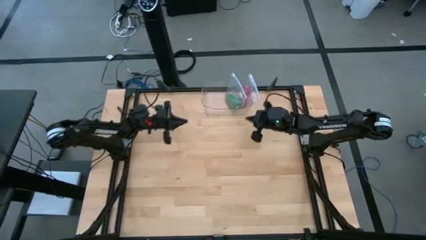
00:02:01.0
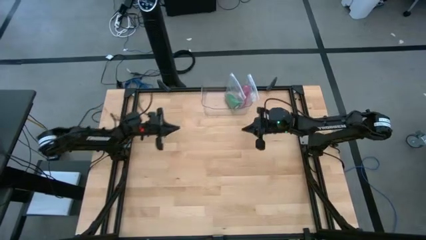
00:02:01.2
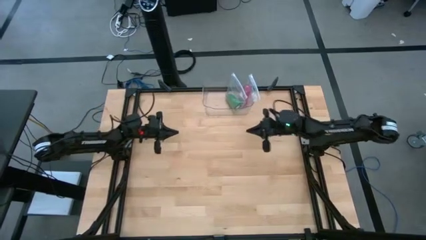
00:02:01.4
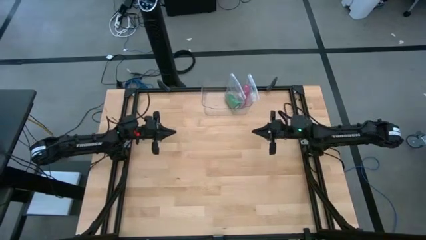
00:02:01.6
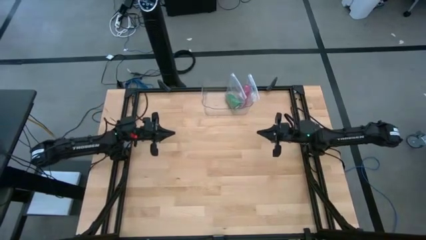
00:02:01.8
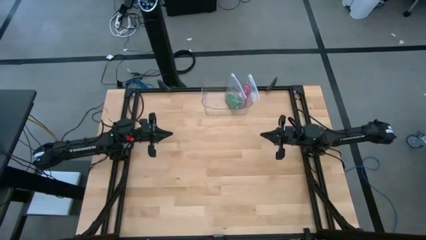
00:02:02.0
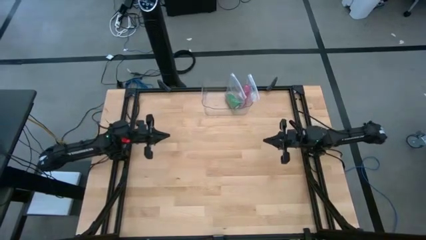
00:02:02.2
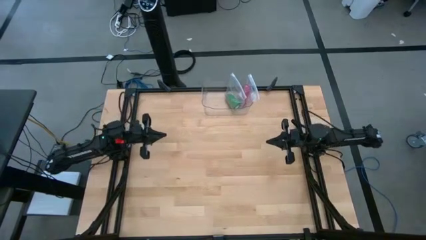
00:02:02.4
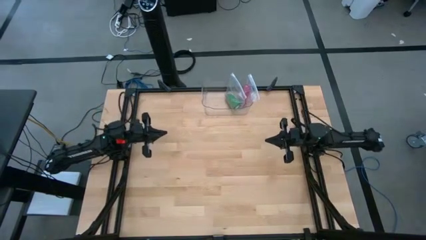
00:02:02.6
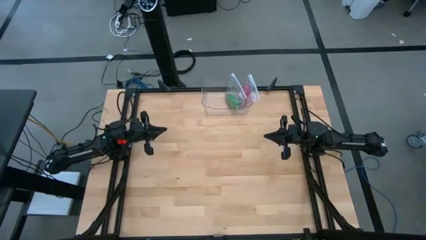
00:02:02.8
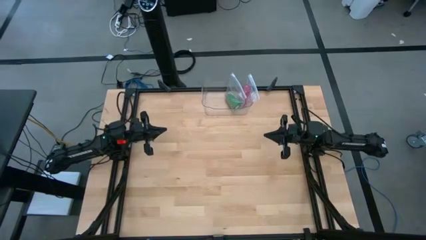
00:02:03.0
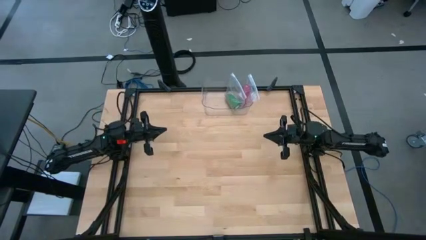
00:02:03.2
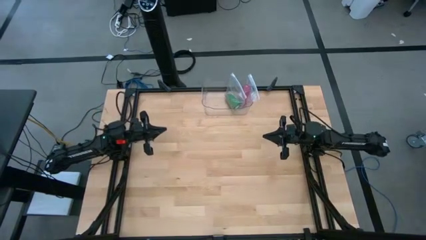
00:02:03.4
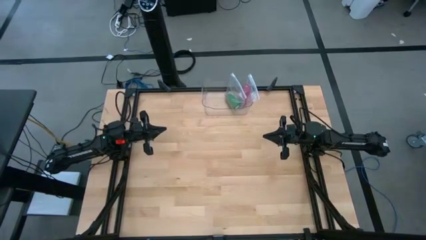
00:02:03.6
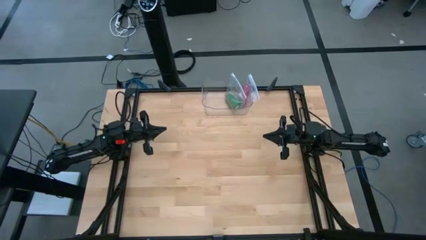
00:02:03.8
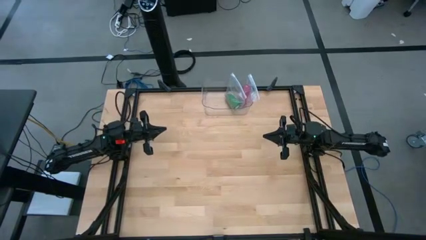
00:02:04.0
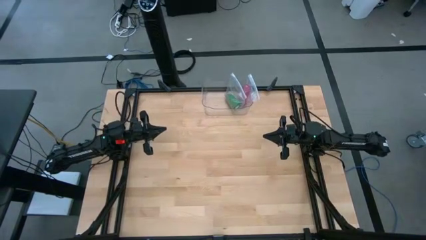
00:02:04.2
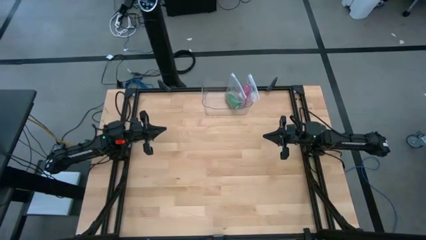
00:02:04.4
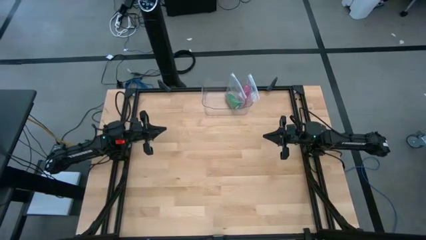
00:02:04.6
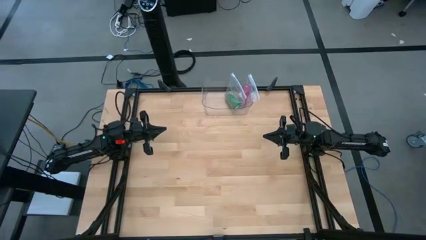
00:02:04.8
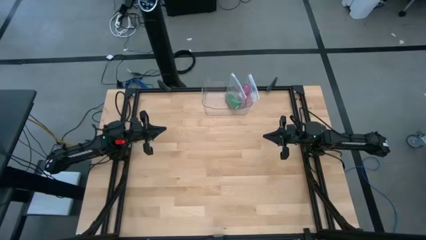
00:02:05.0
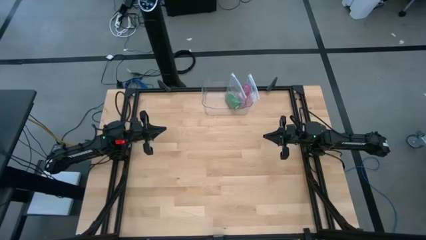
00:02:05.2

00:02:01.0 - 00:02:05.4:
Task: Roll bandage
Return to Home Position

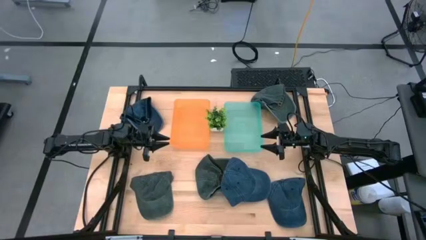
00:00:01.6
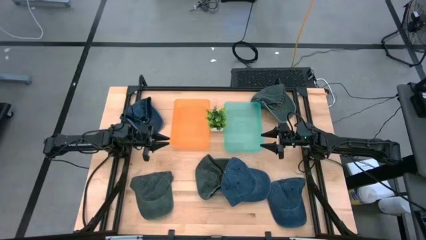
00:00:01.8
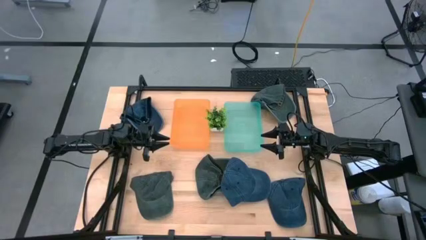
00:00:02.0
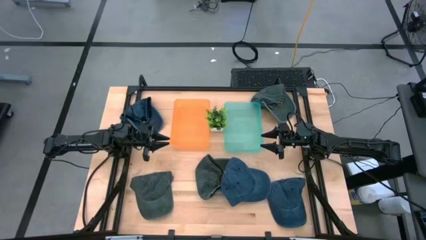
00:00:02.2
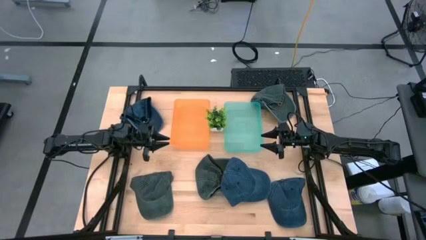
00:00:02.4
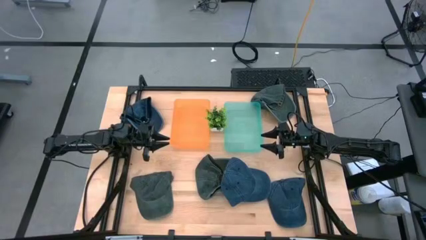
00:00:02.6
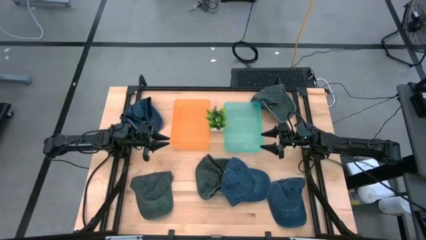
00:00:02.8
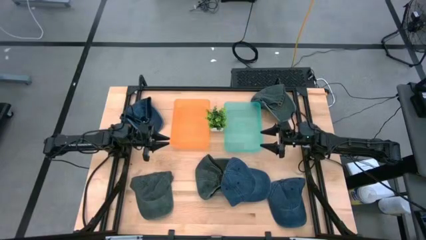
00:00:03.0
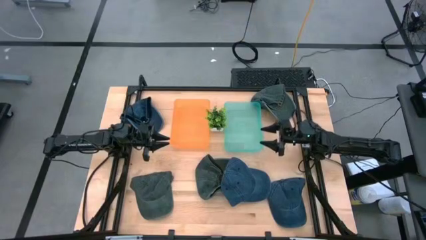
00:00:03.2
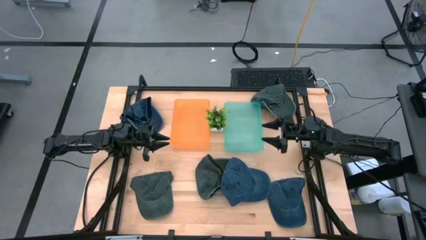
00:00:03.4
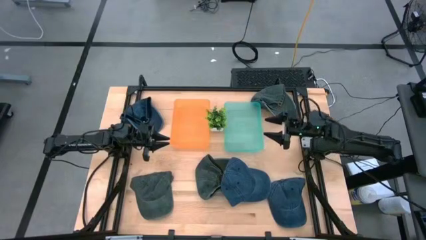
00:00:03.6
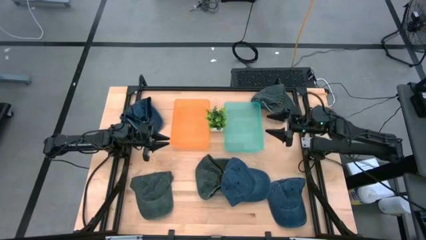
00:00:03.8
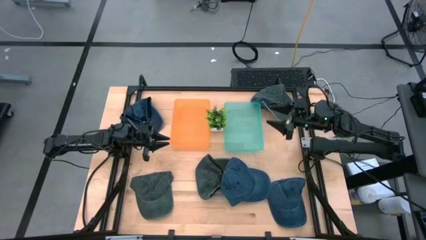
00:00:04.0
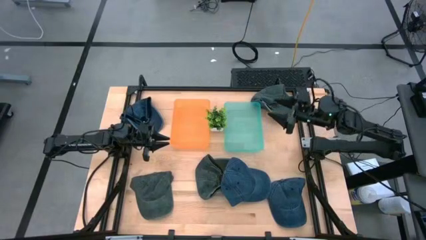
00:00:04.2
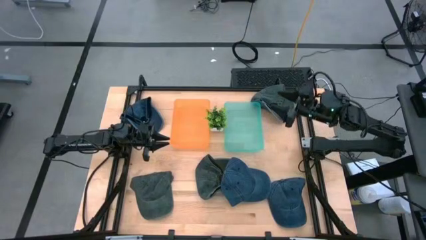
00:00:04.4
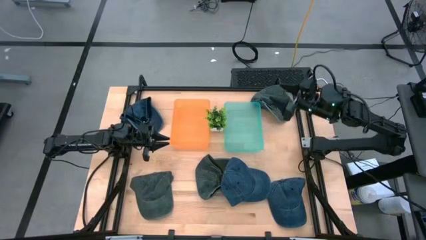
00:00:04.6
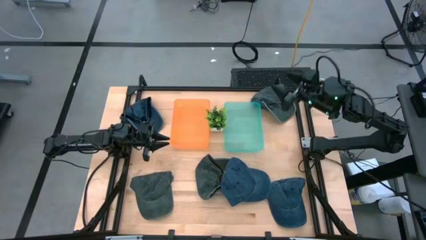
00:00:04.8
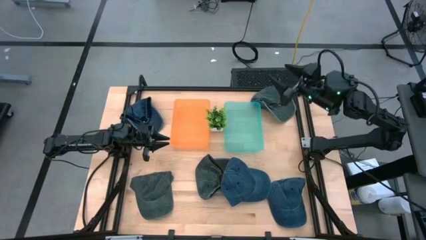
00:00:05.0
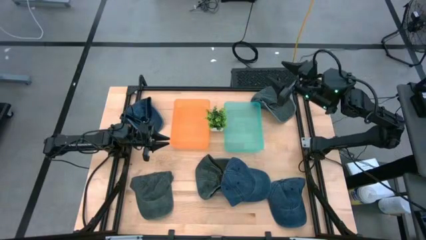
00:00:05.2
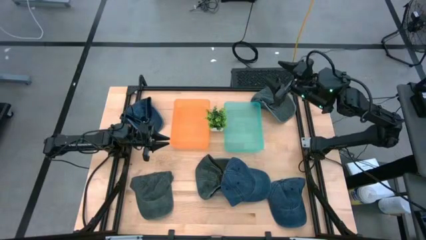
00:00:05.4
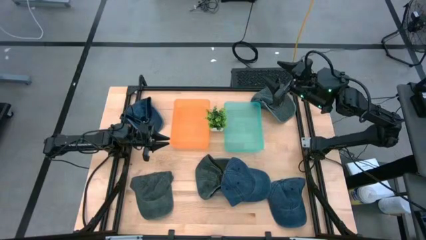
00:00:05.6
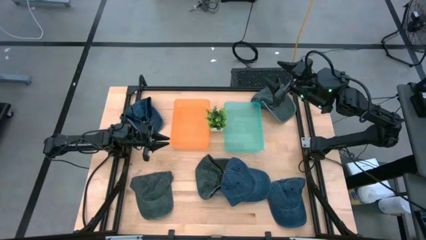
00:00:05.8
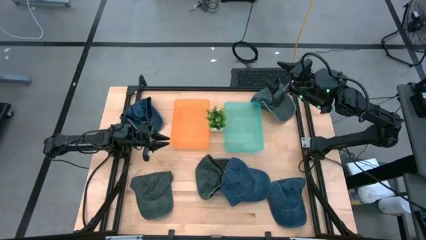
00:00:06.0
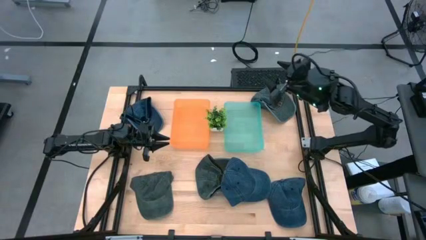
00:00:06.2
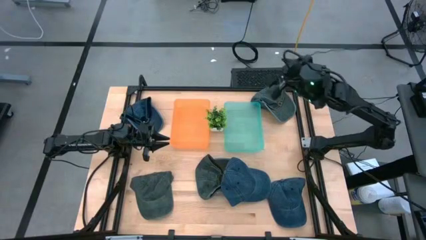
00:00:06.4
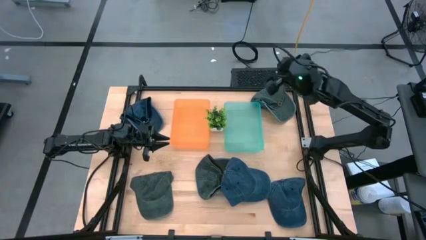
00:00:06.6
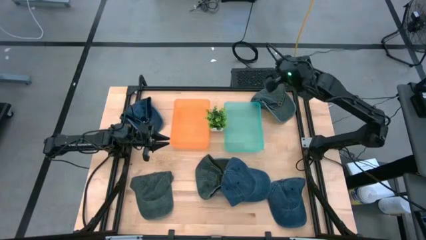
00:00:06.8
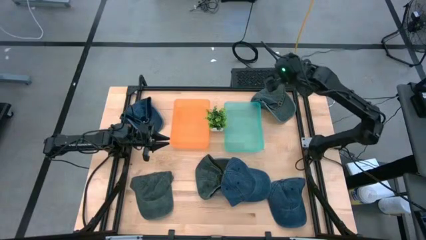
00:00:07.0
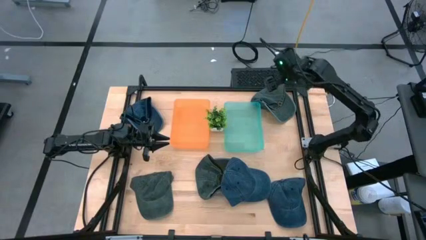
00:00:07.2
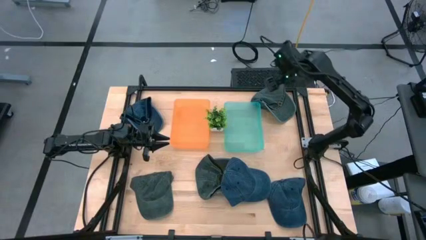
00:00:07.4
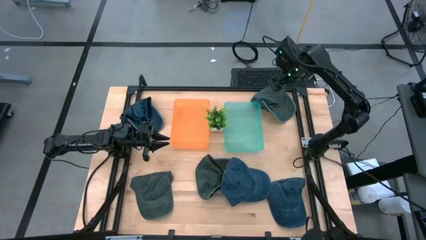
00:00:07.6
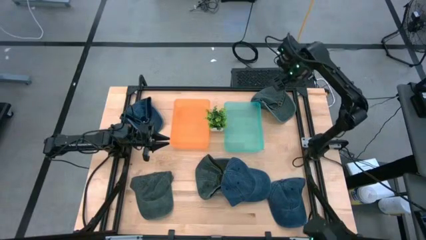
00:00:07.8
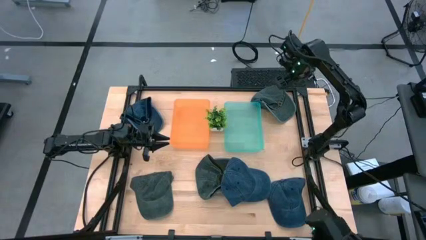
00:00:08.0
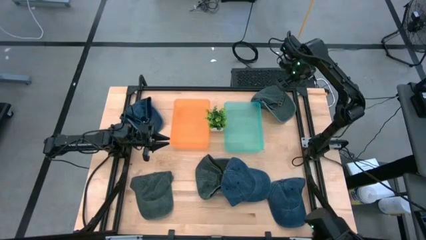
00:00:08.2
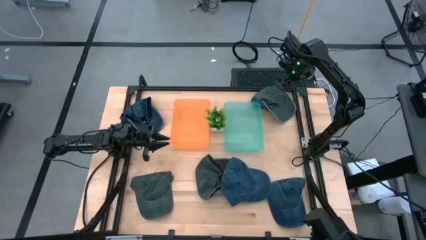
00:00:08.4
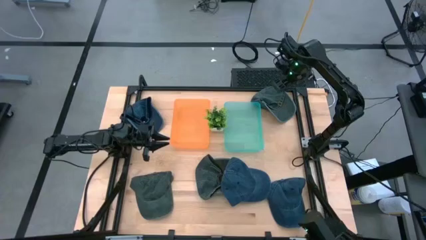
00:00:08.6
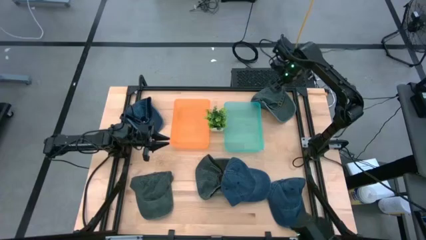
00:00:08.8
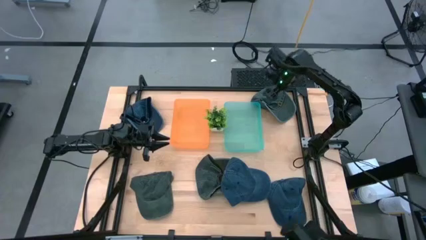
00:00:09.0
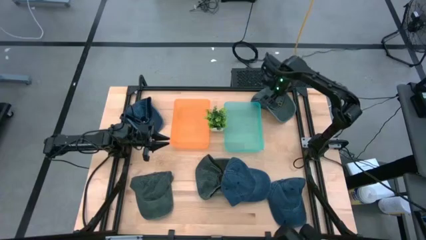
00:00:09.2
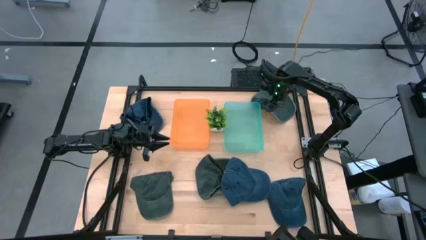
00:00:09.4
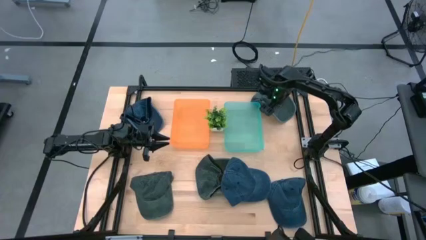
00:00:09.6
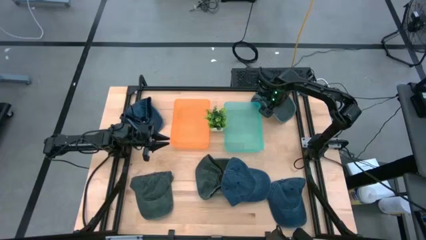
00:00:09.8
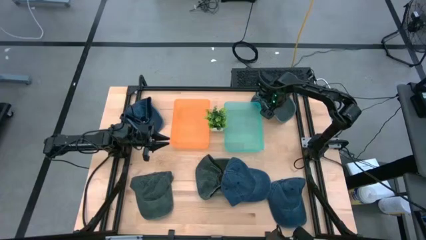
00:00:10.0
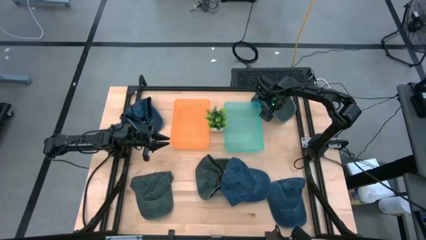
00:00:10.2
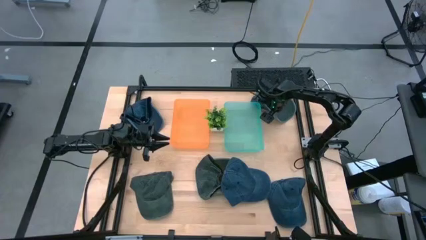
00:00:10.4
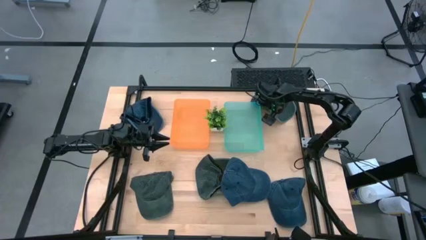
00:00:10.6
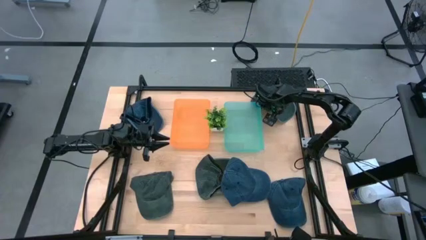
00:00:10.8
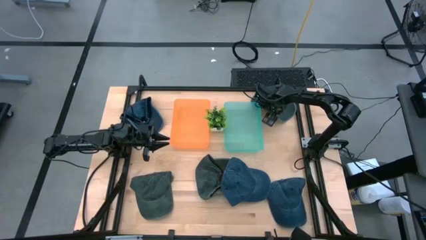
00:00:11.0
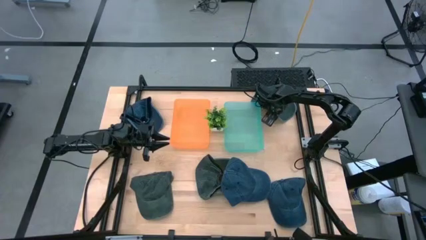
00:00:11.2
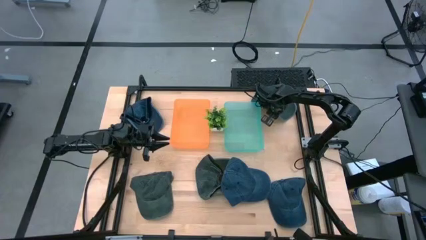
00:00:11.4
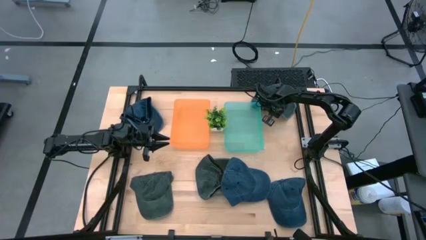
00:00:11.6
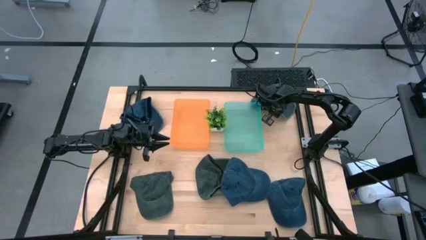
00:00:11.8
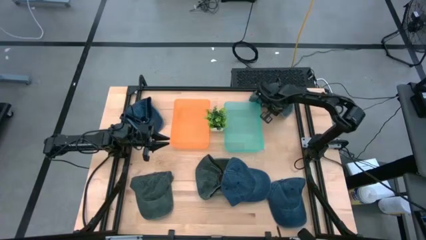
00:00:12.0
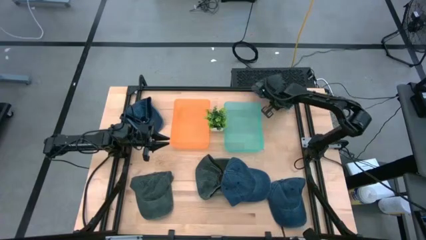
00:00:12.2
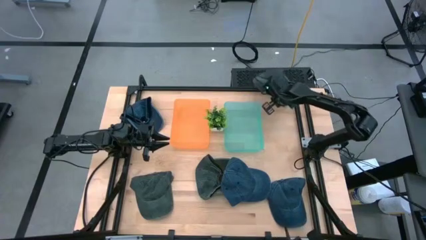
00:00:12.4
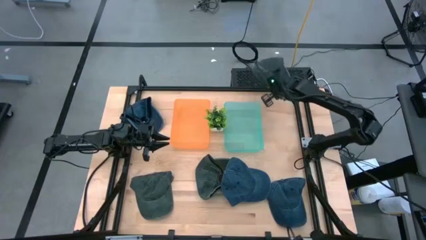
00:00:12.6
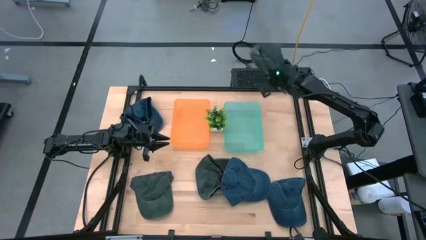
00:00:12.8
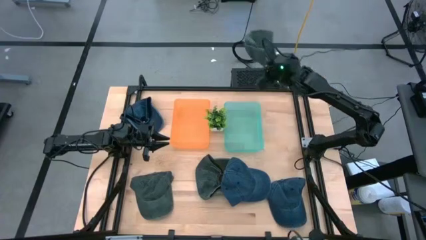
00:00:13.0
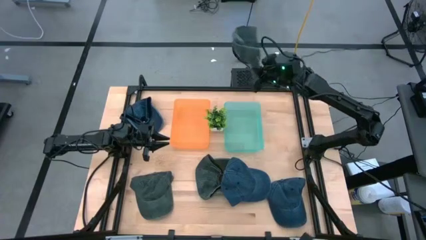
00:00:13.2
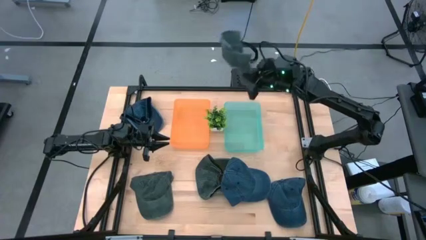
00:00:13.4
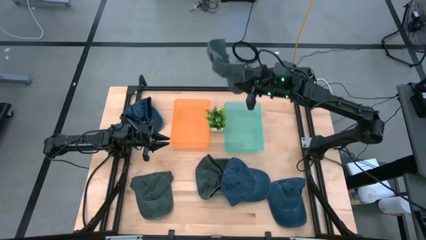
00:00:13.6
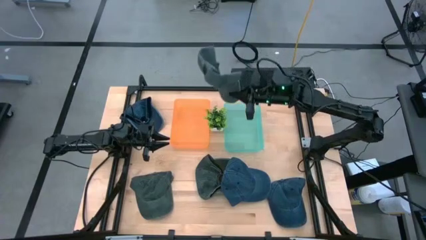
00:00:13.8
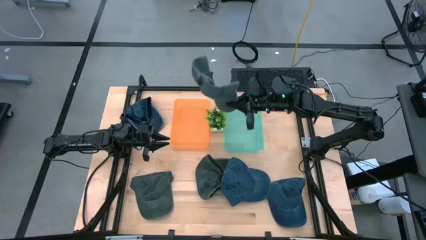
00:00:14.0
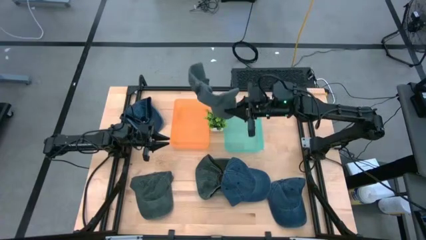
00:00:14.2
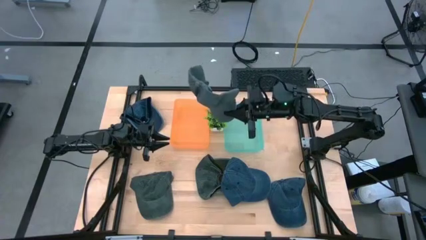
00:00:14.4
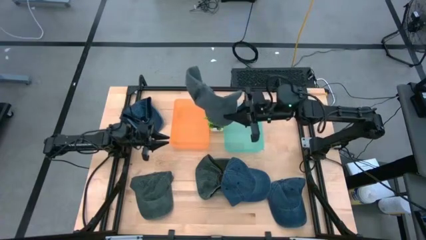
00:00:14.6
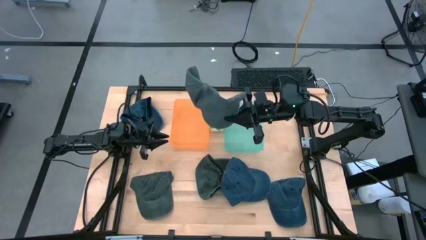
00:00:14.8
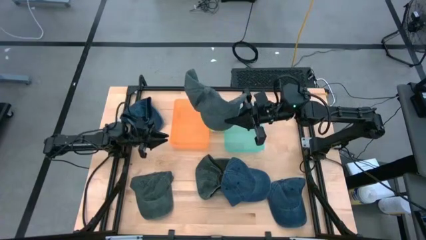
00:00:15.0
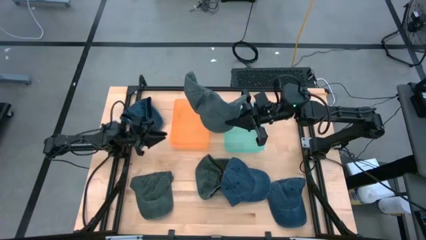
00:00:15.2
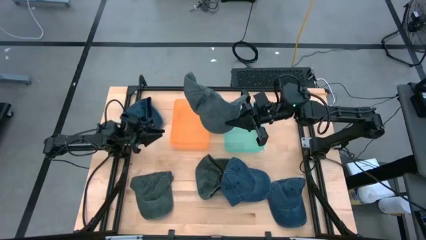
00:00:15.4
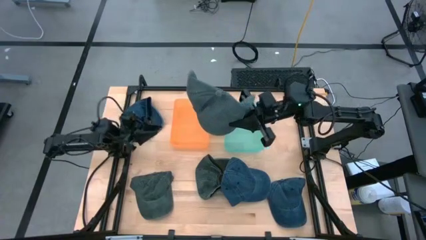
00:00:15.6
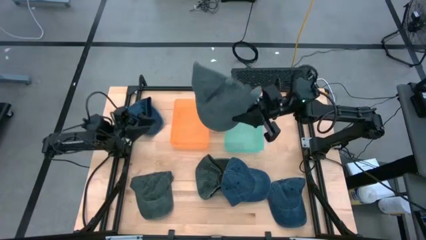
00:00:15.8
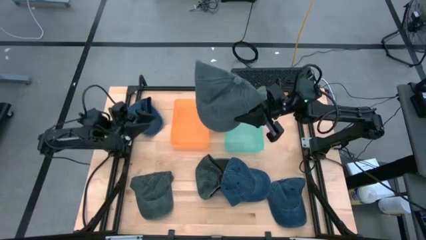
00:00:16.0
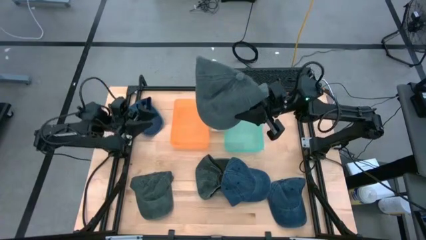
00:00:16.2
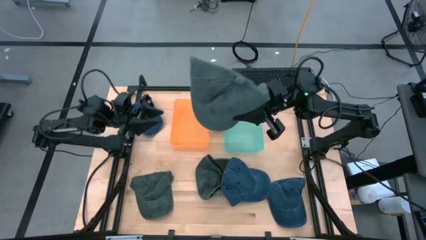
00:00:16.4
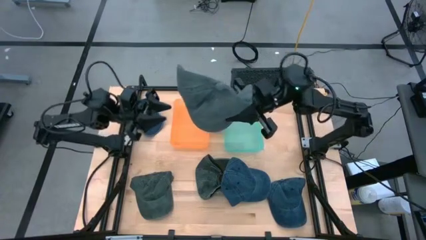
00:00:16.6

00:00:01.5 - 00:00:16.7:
Task: Pick & Place hat
Put the top gray cap into the green bin
